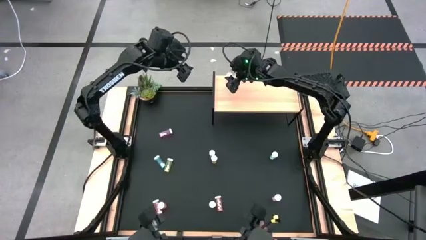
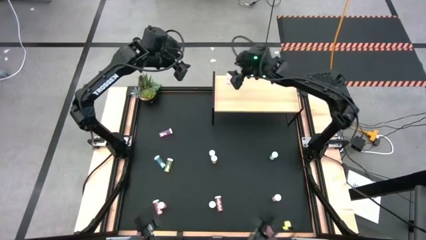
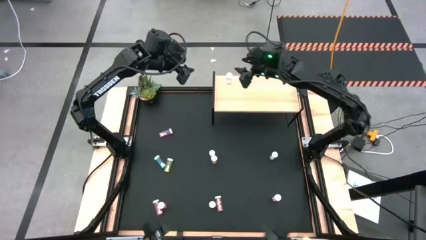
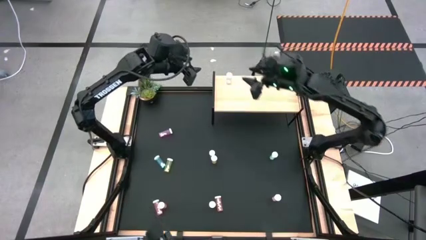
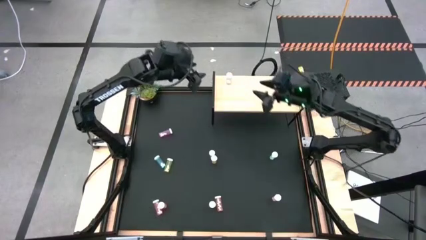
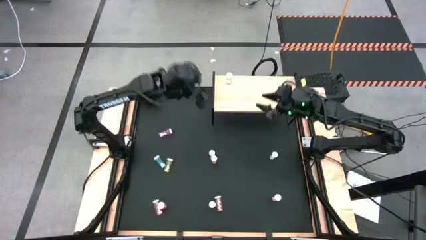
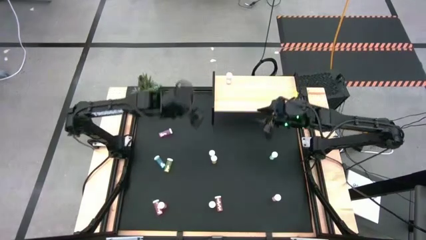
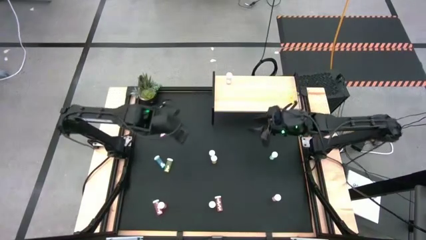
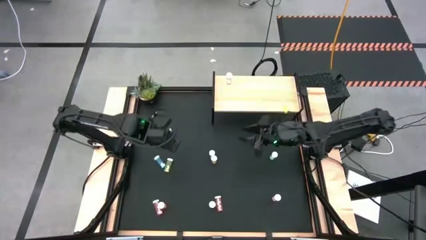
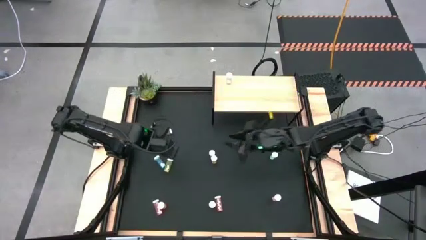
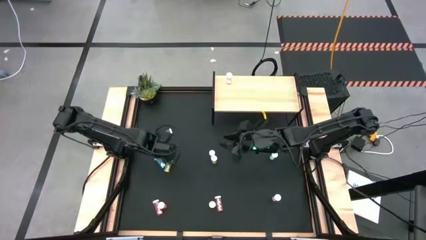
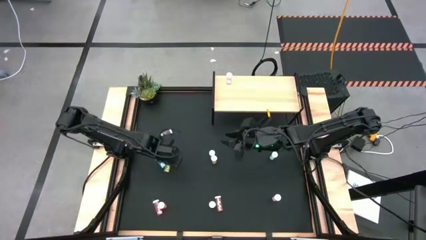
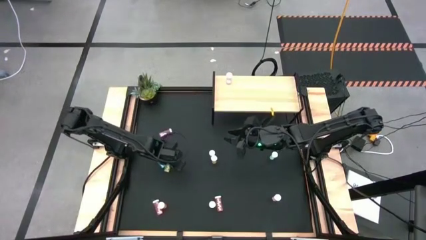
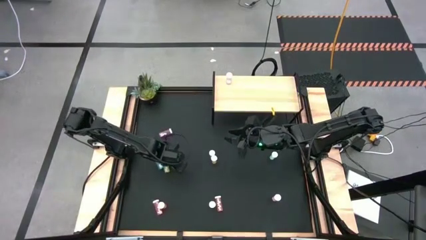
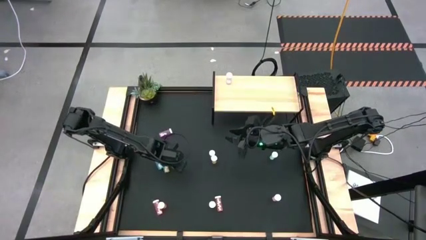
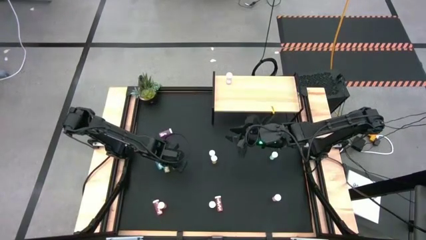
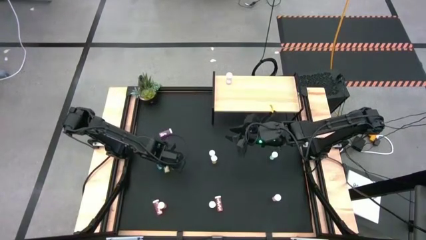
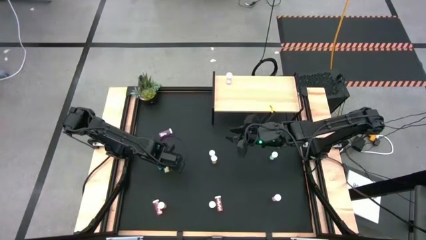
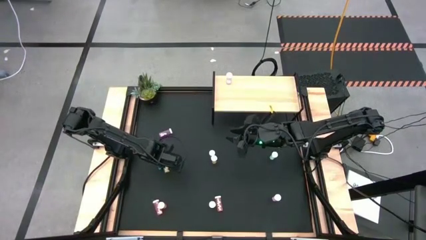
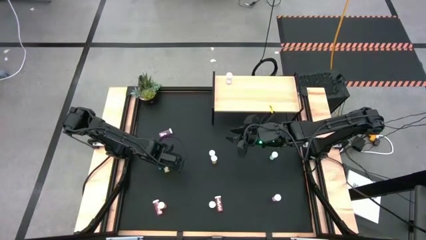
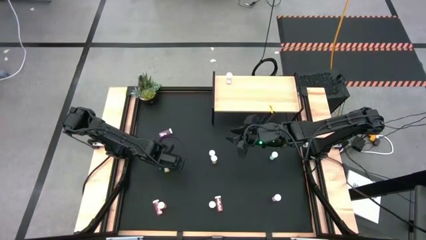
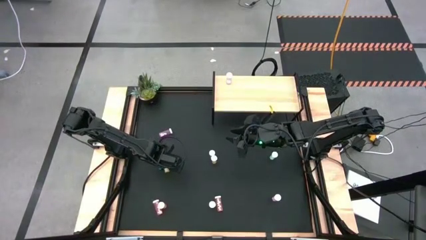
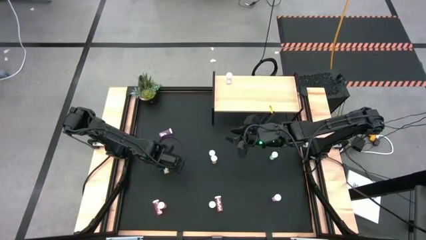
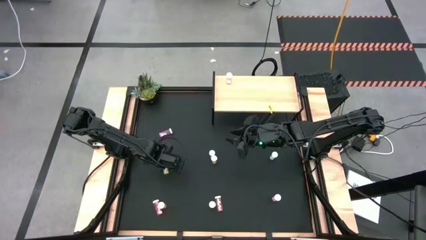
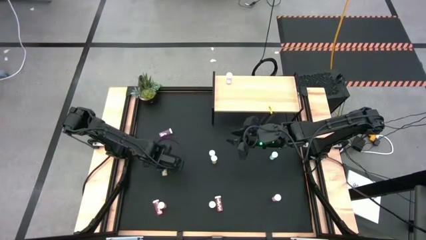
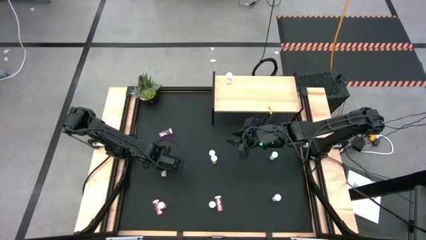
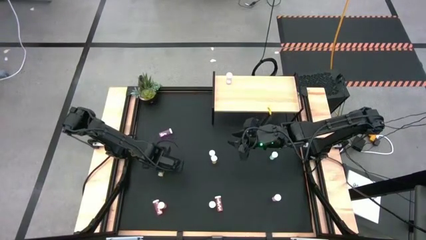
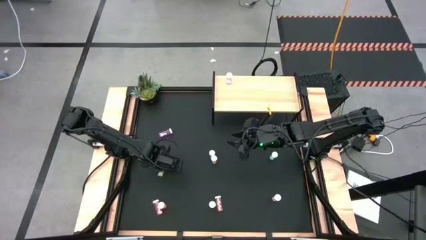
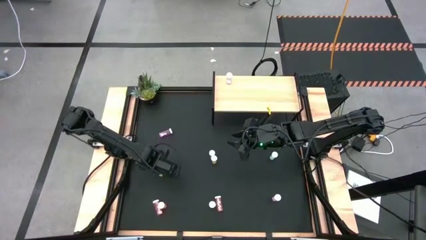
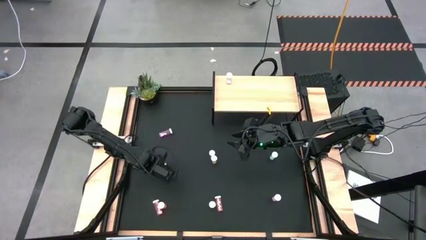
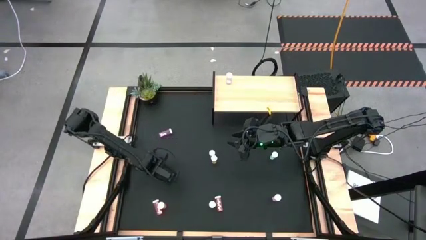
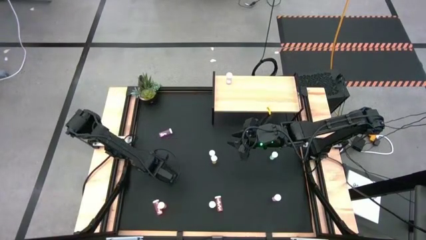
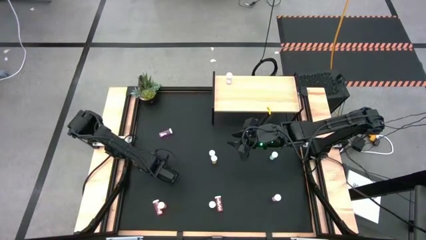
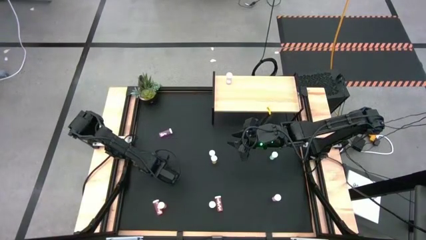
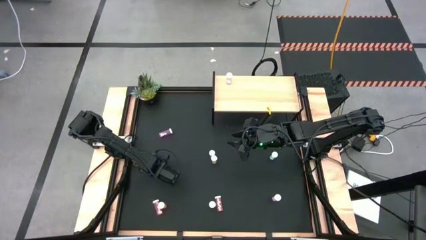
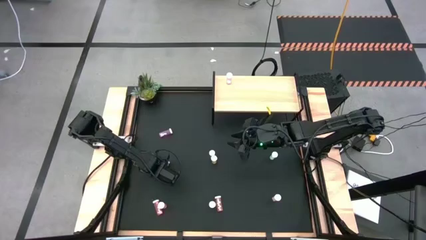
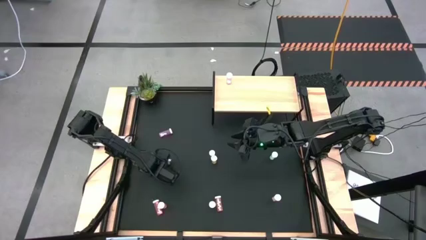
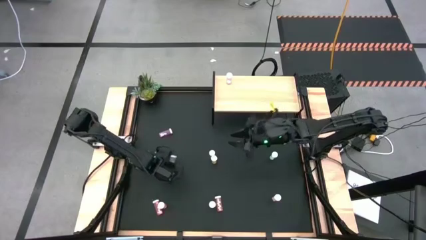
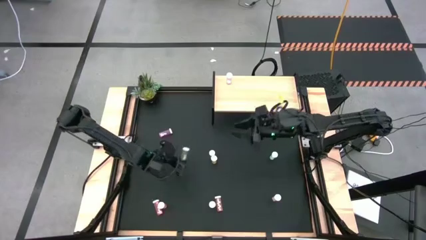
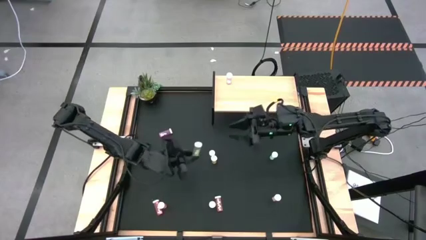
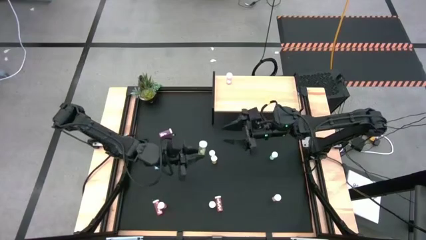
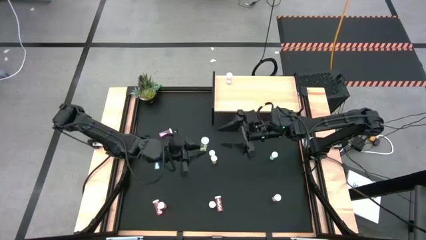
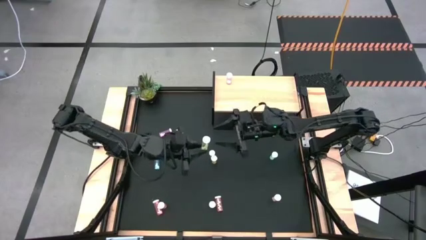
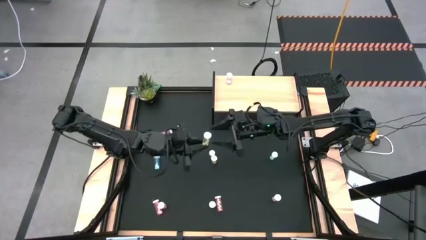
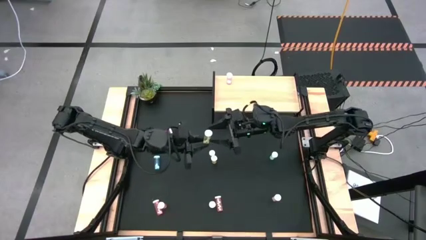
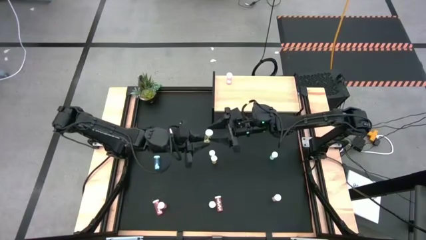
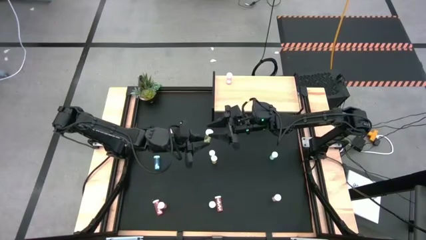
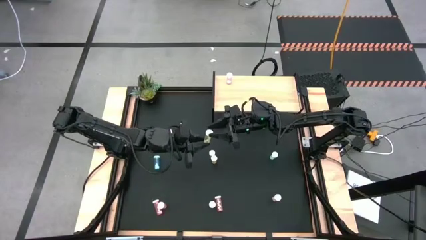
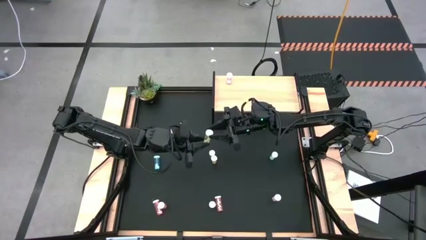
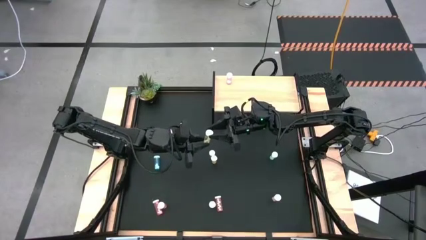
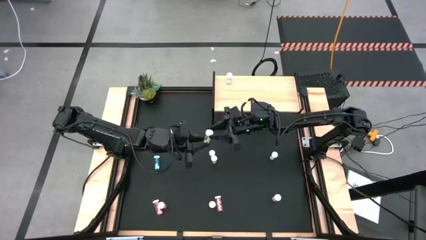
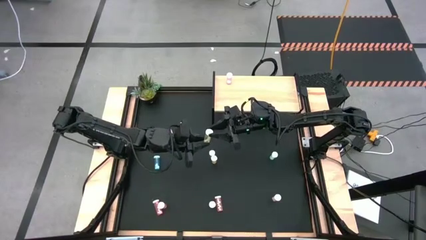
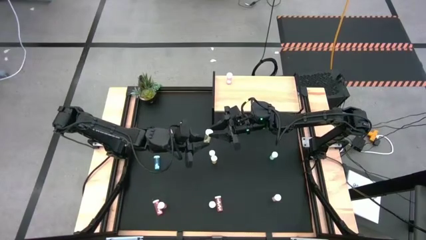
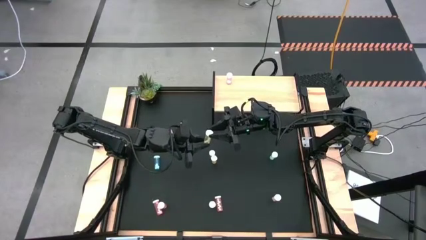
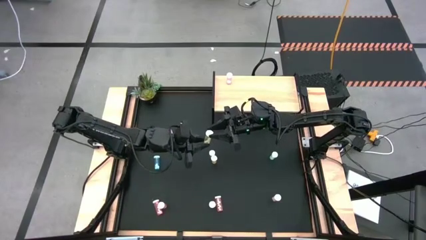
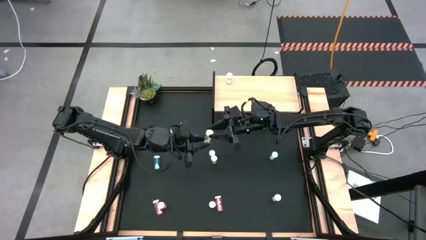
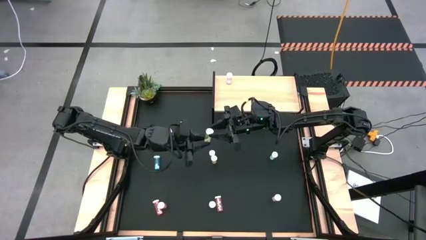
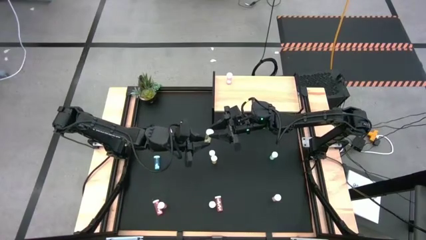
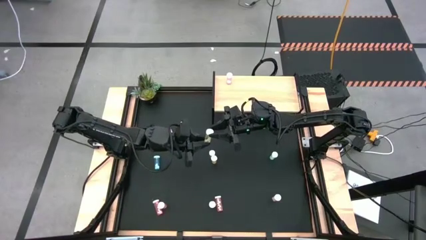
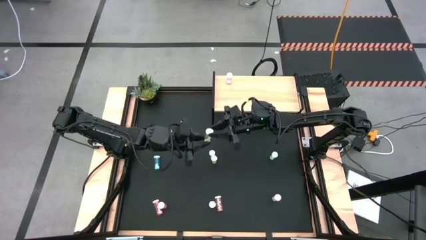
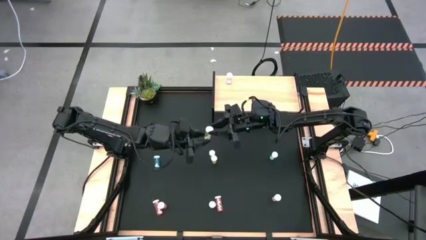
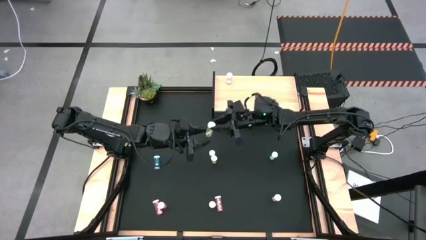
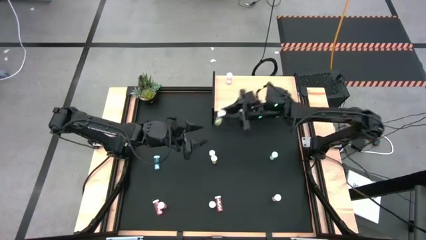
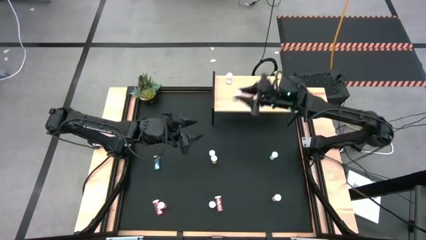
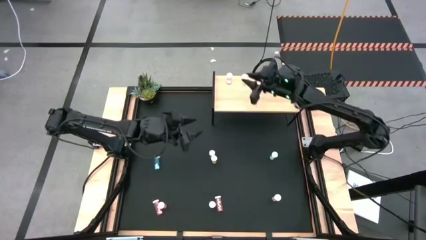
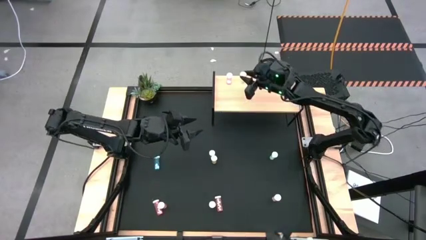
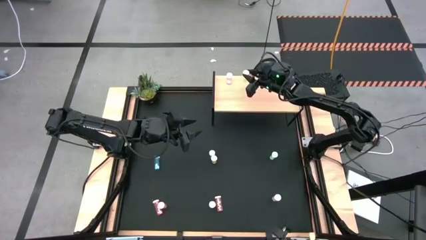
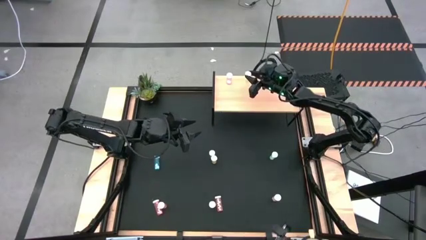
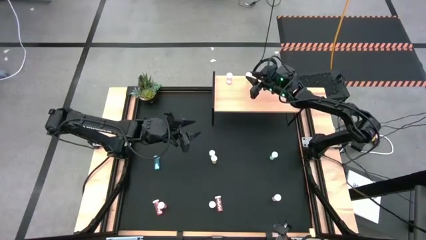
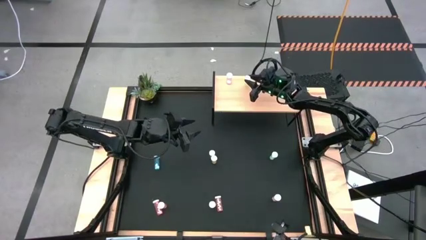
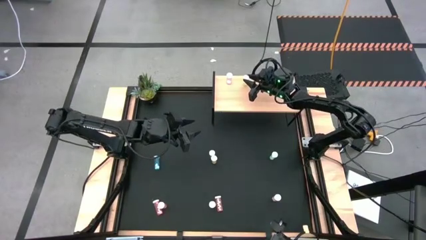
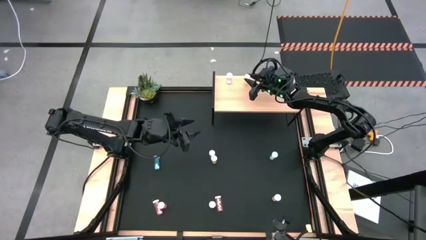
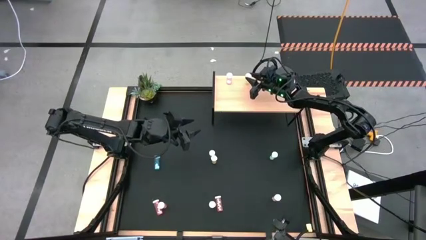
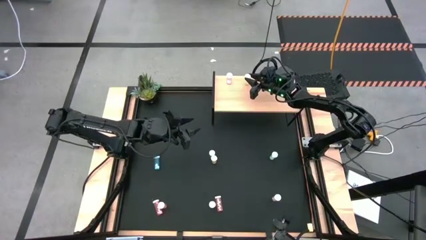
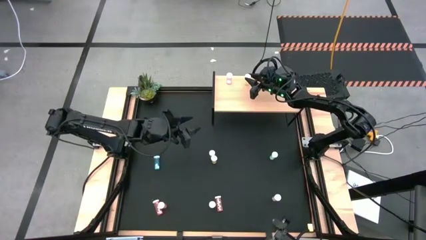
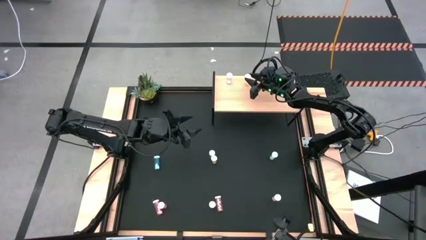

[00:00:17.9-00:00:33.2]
Task: Pick and place medicine bottles onto shelf by color
Put the top left yellow pill bottle on the shelf
